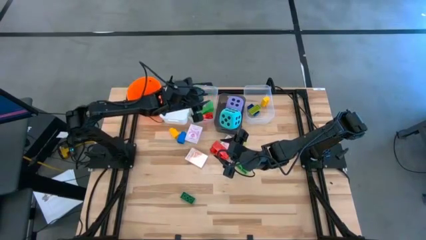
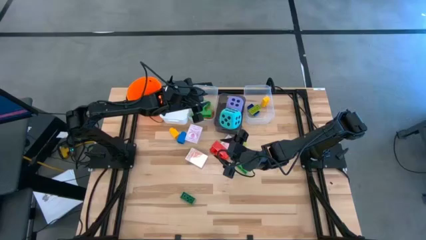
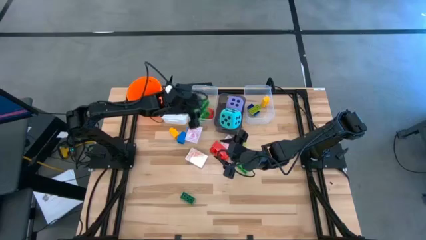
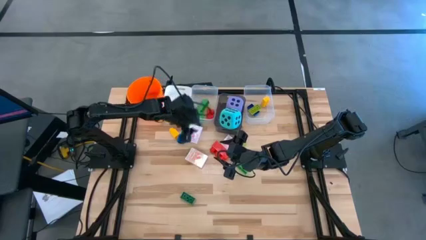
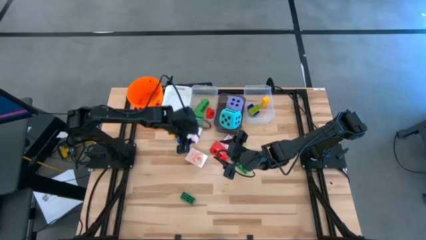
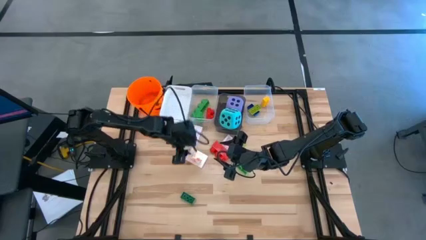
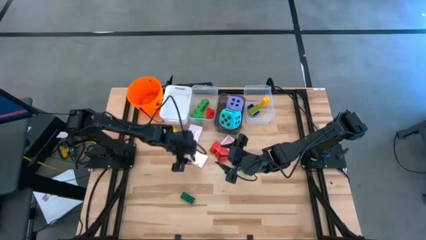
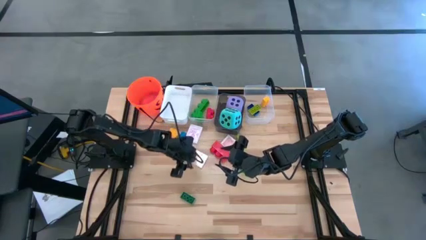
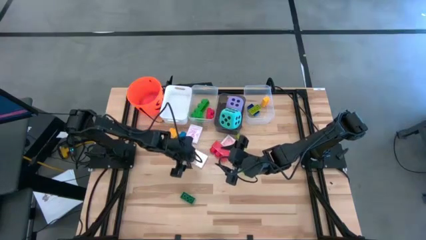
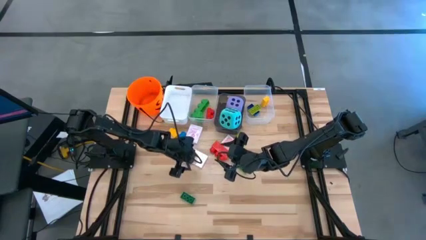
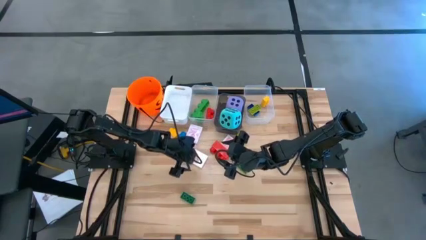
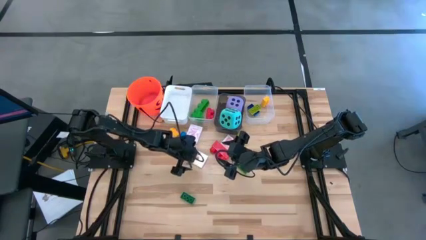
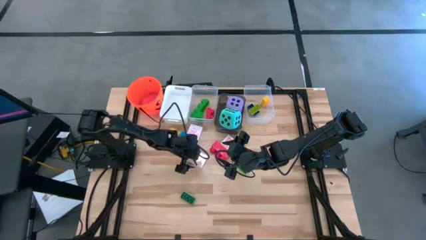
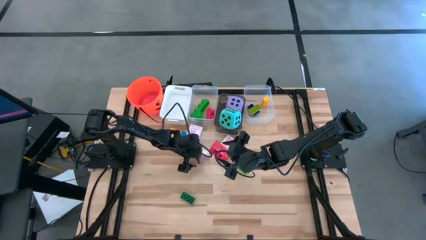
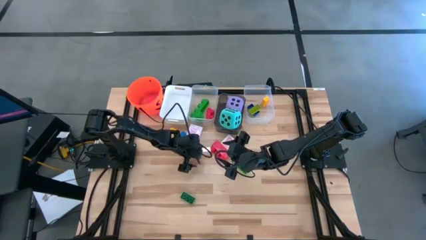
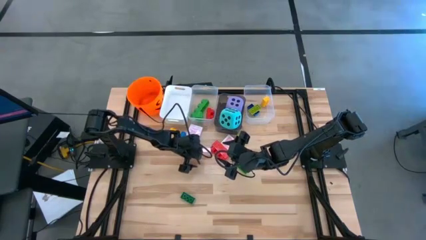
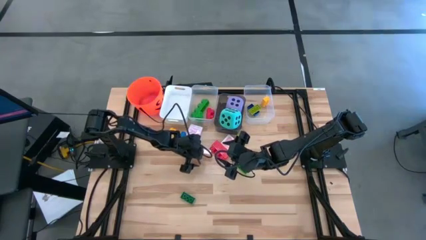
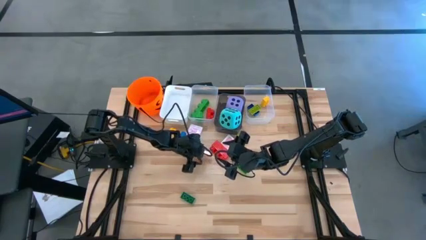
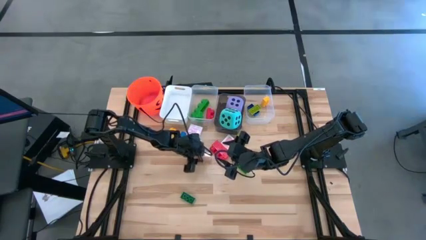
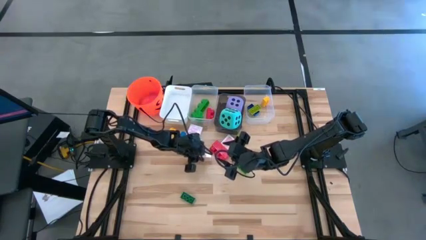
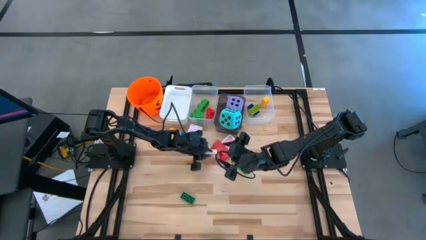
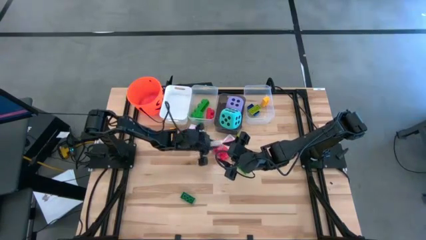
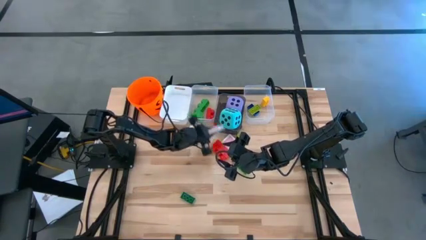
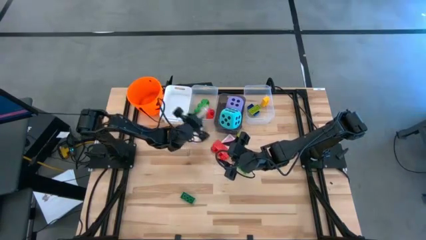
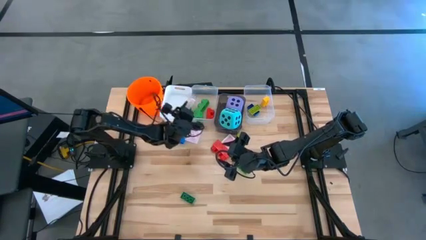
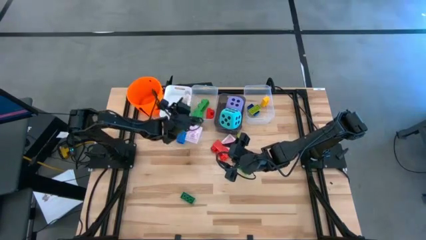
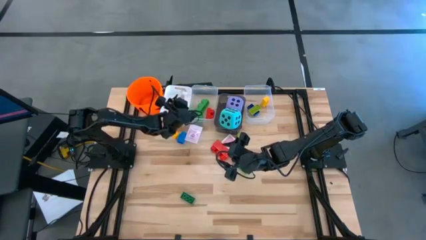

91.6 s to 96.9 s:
Task: Pick & Place Toys
Put the orange playing card box into the white bin

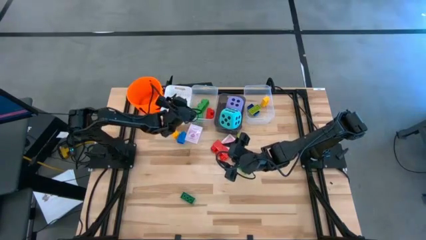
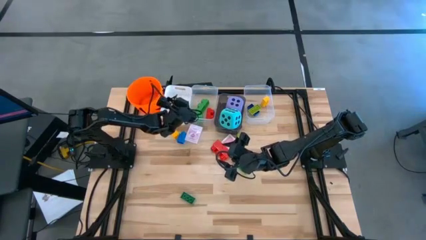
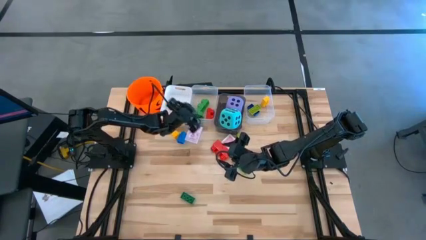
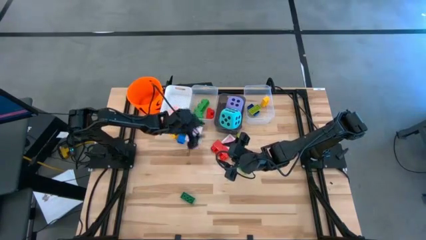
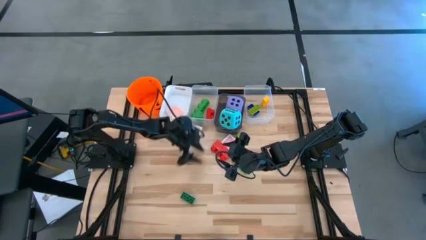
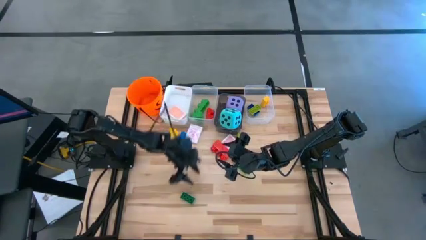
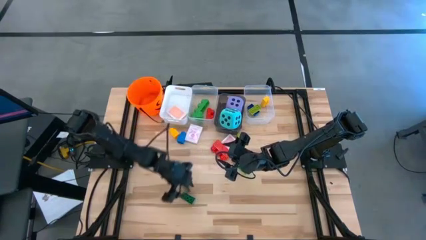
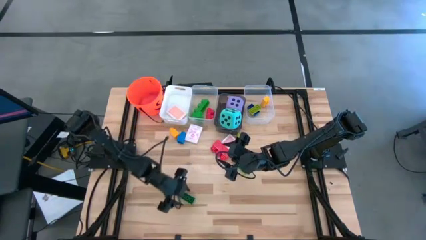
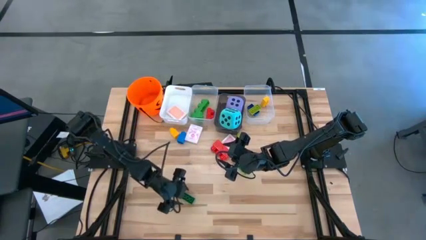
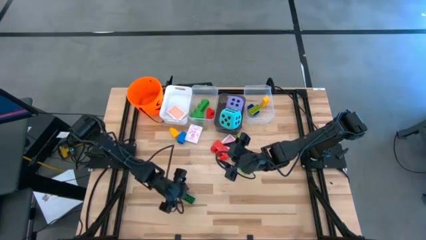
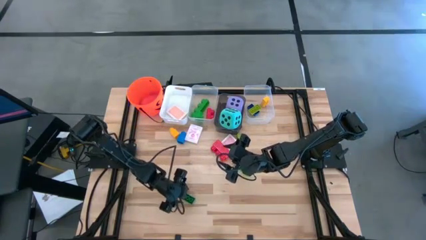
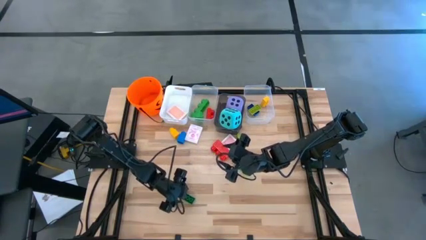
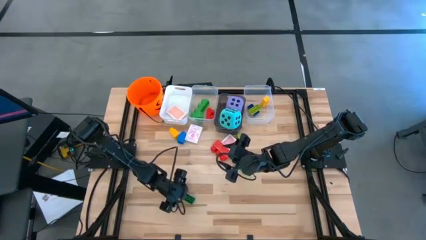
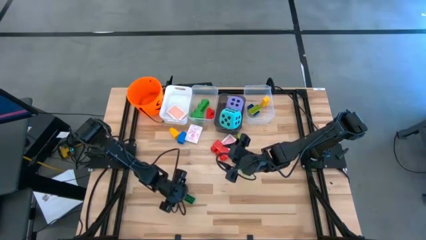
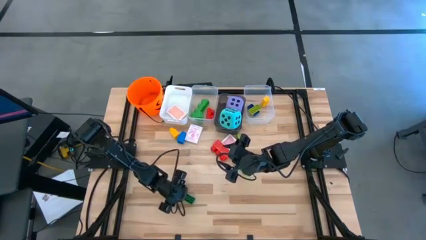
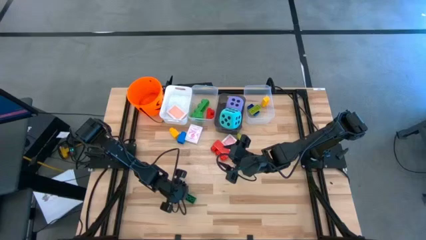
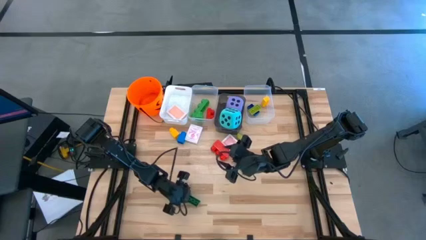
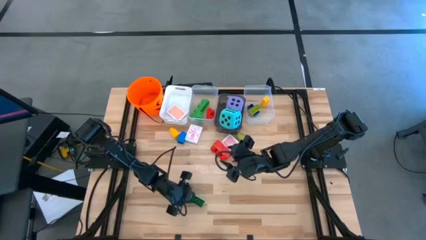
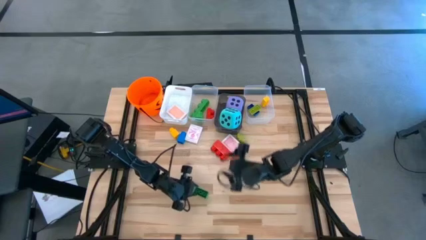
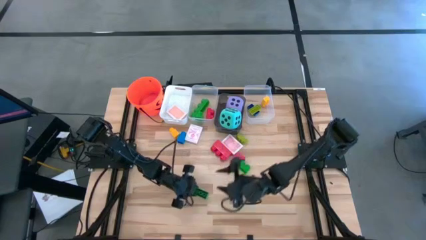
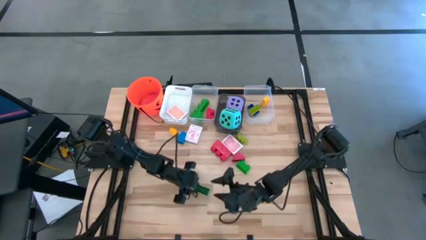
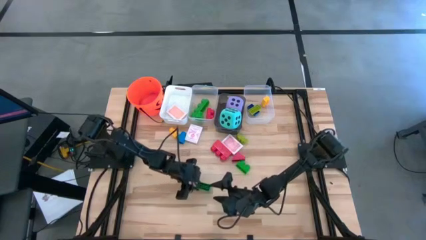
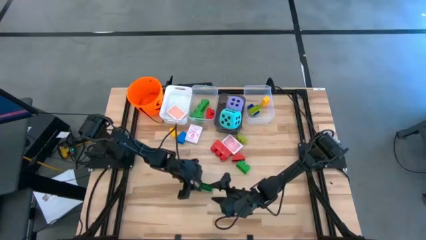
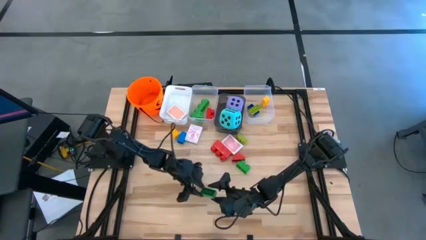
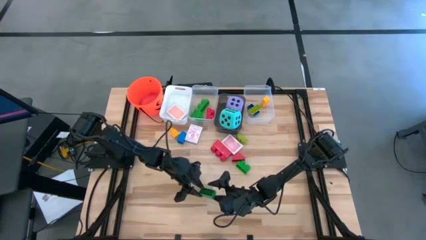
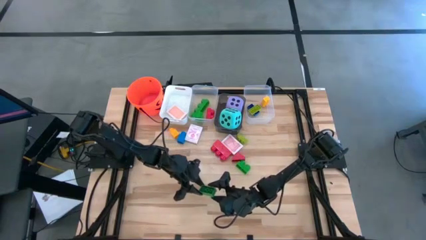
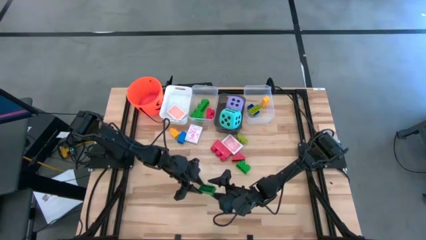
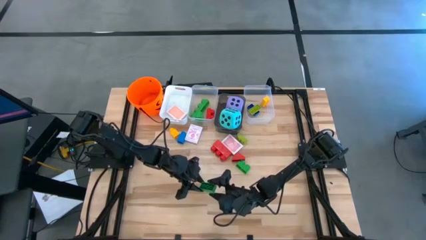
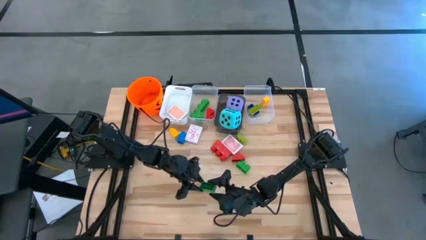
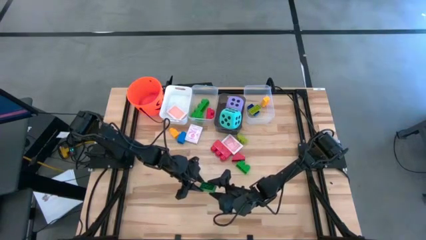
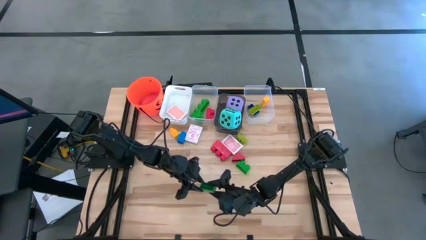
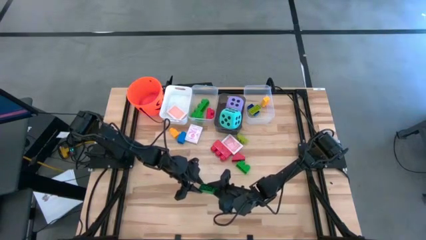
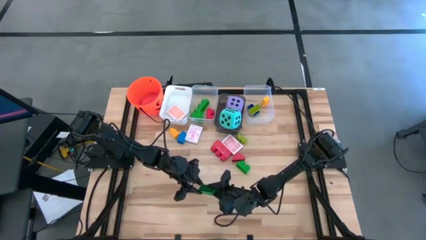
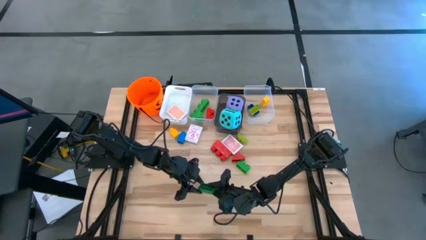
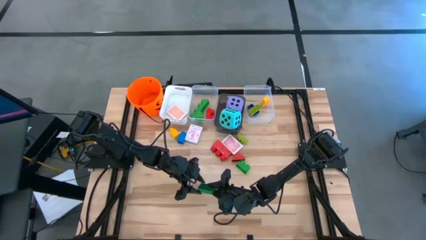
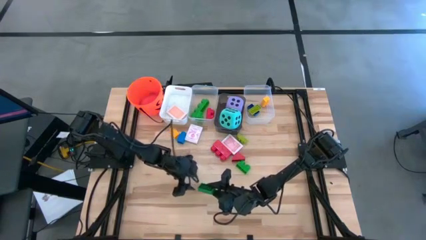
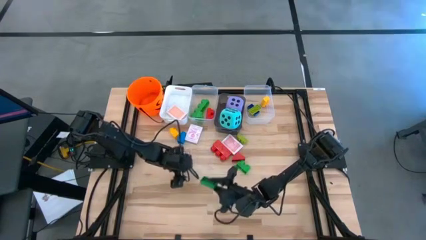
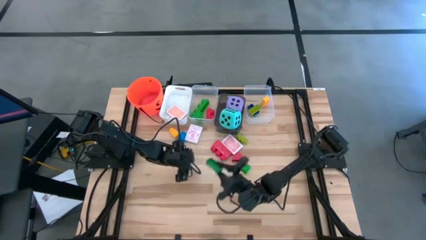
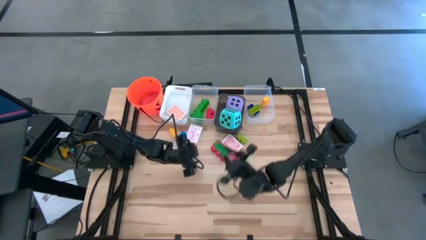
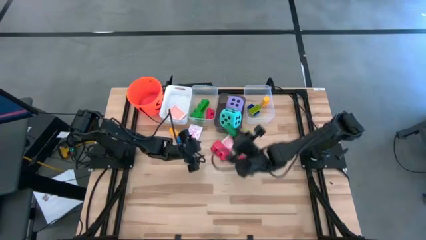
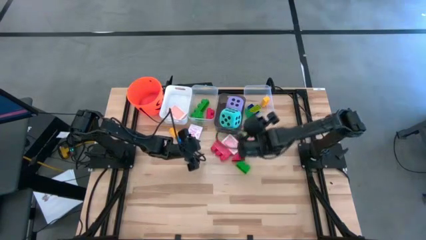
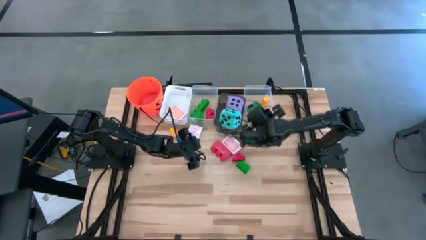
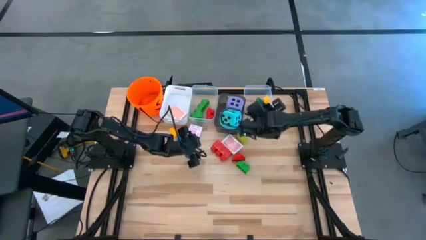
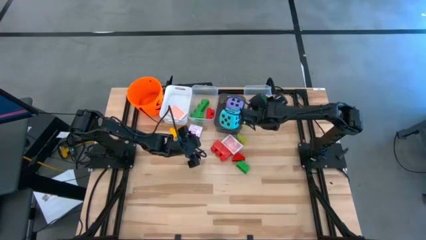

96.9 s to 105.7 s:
Put the bottom small green game piece into the right transparent bin

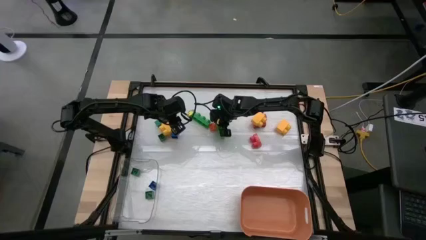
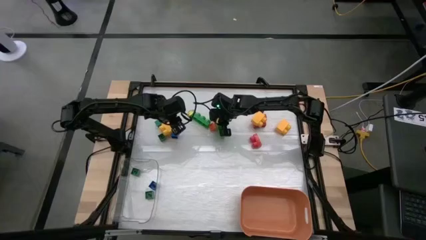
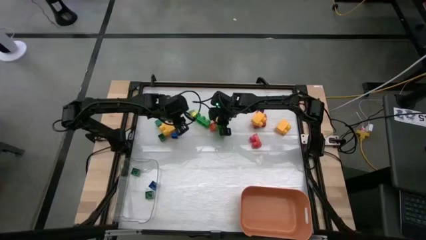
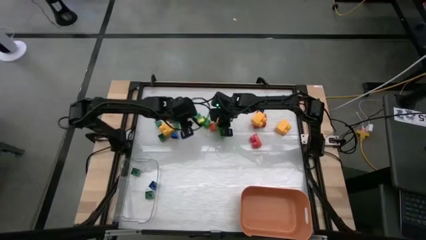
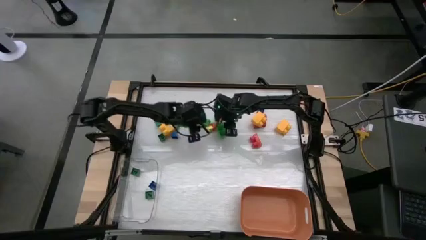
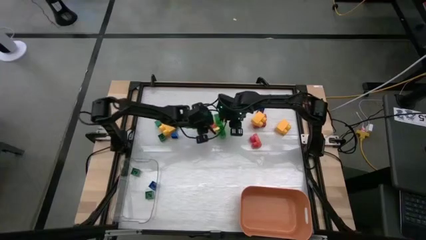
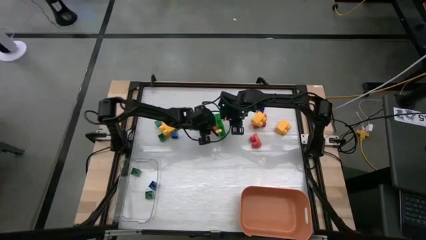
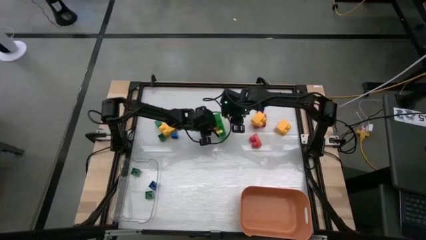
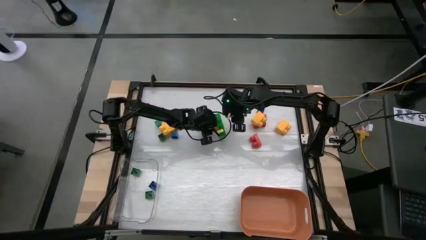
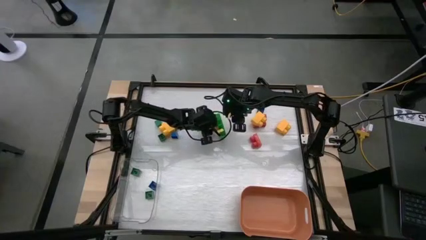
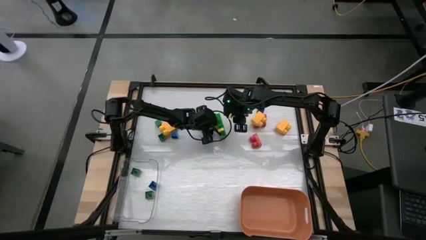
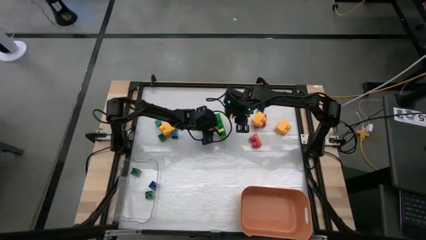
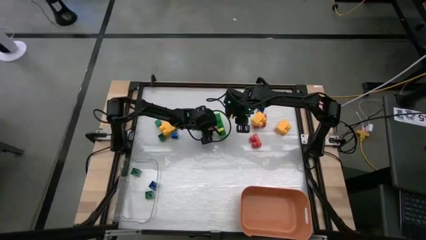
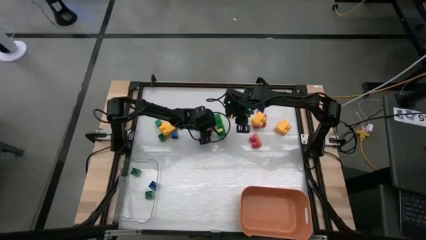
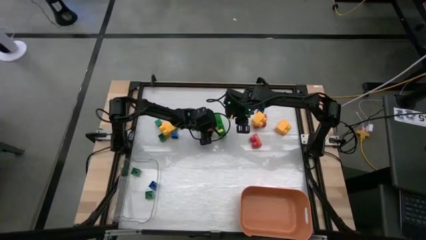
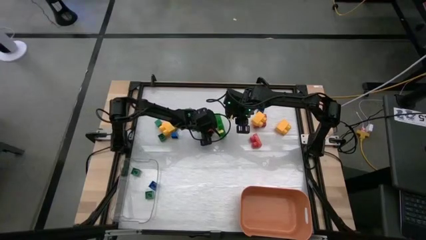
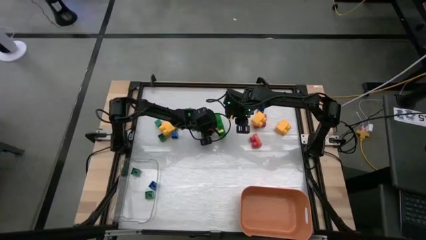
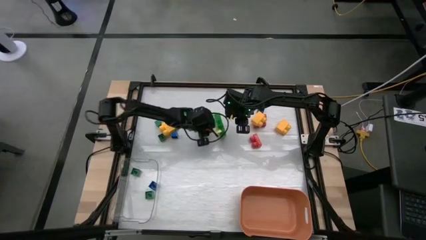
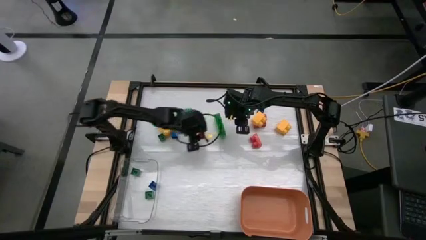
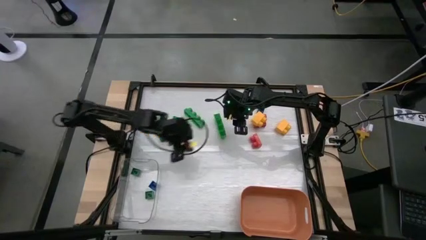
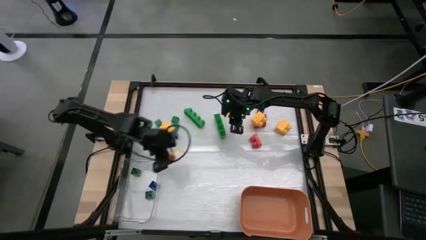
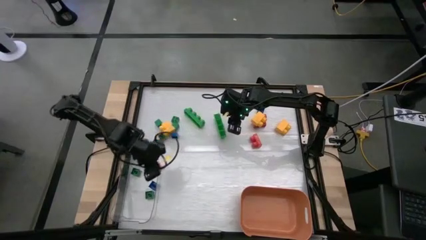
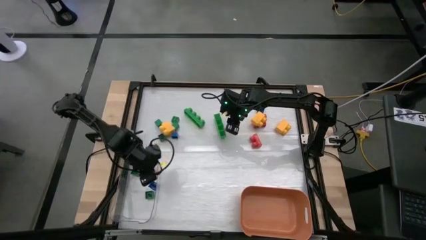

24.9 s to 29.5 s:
Task: Sort blocks by size
Put the small orange game piece into the transparent bin
